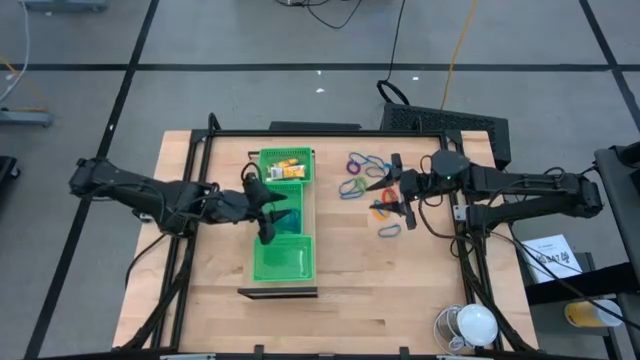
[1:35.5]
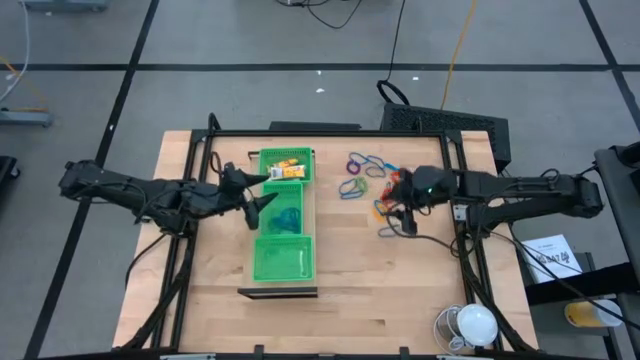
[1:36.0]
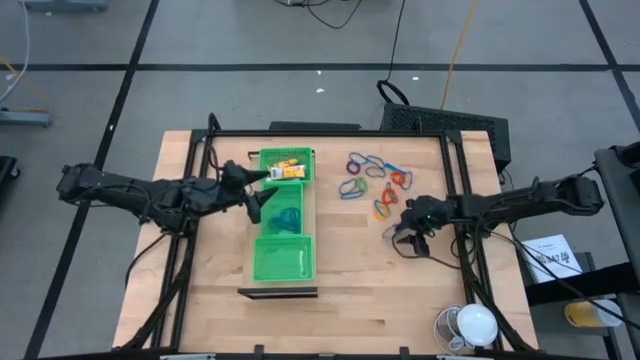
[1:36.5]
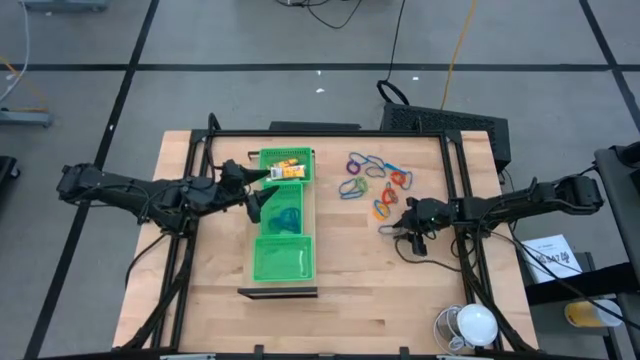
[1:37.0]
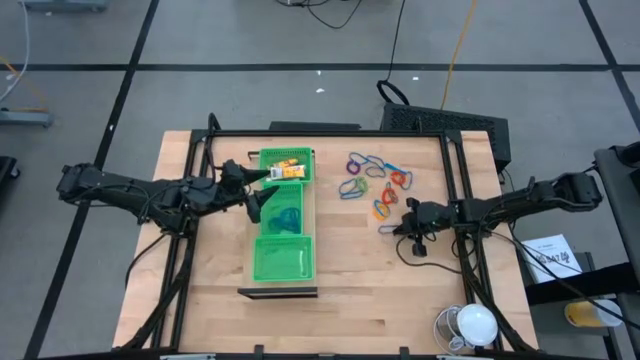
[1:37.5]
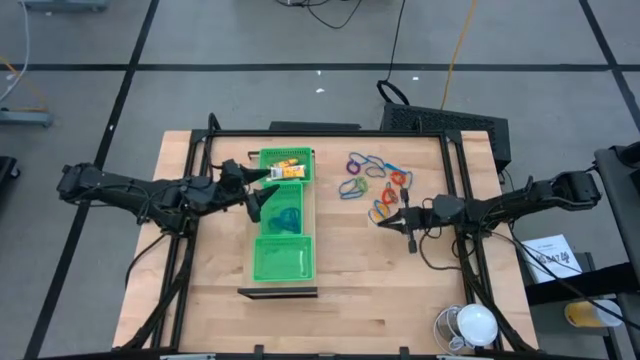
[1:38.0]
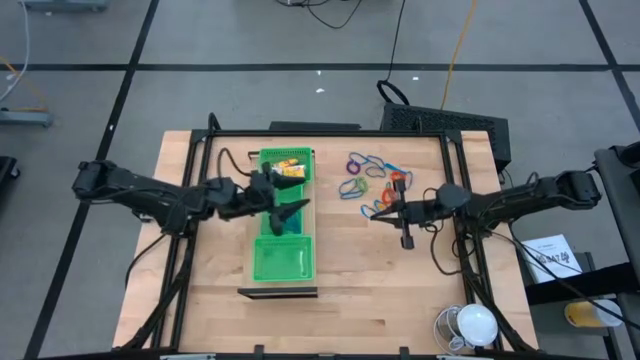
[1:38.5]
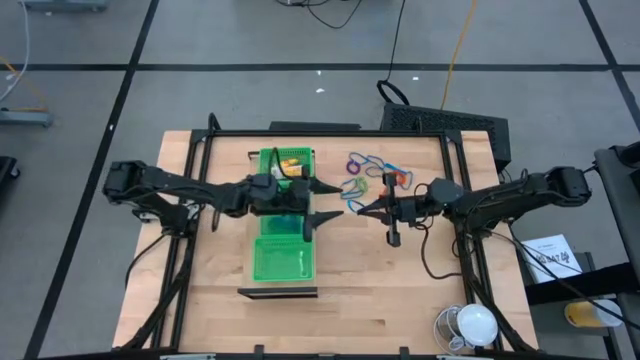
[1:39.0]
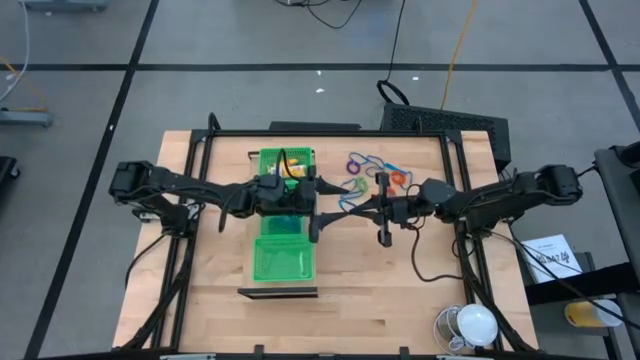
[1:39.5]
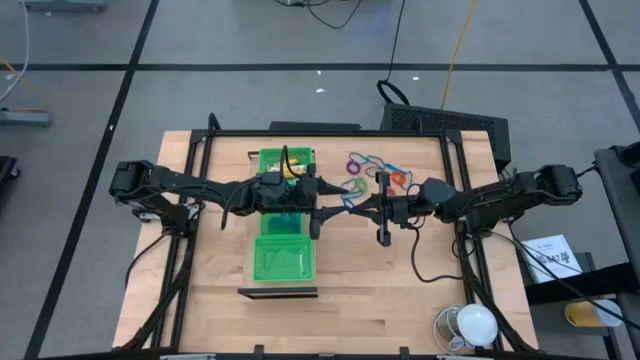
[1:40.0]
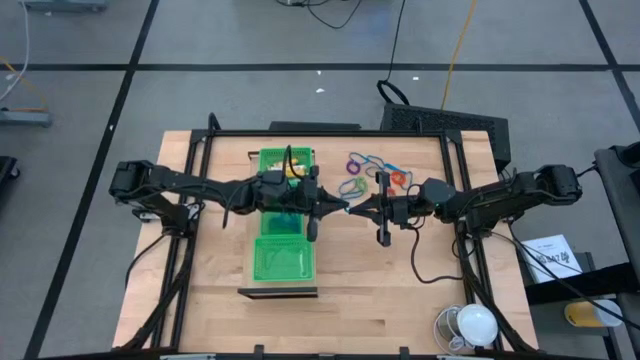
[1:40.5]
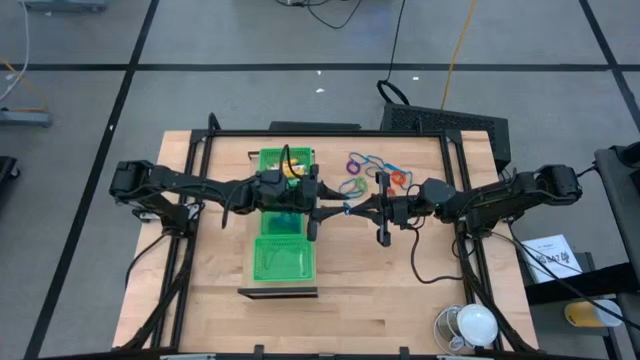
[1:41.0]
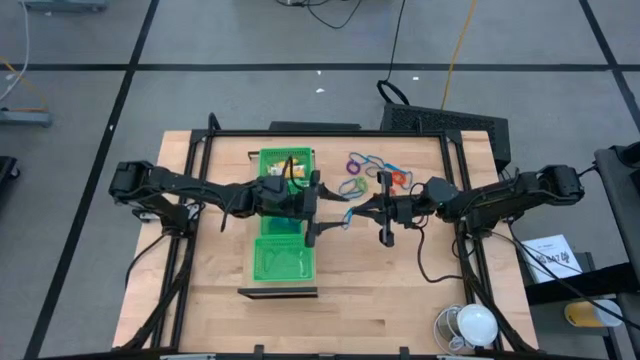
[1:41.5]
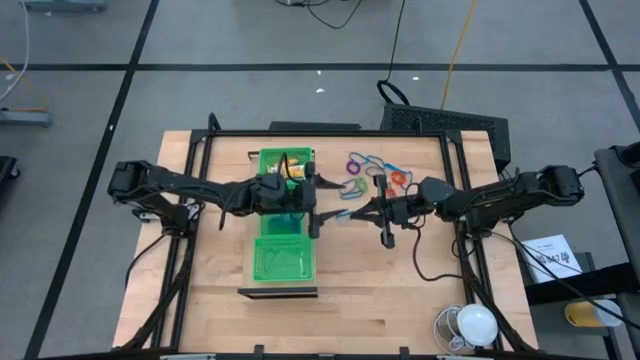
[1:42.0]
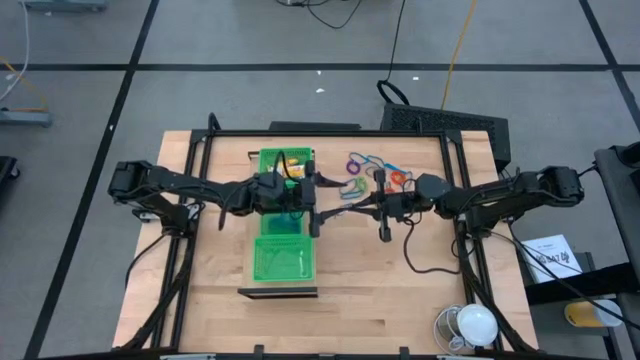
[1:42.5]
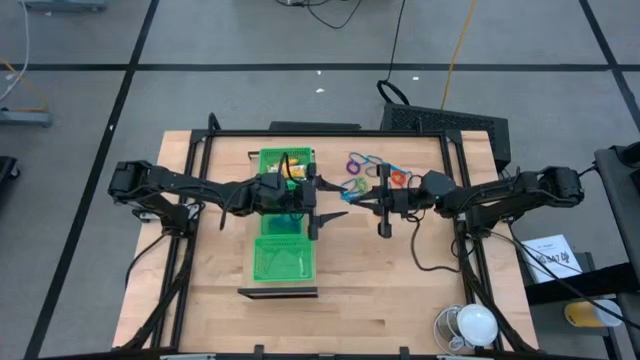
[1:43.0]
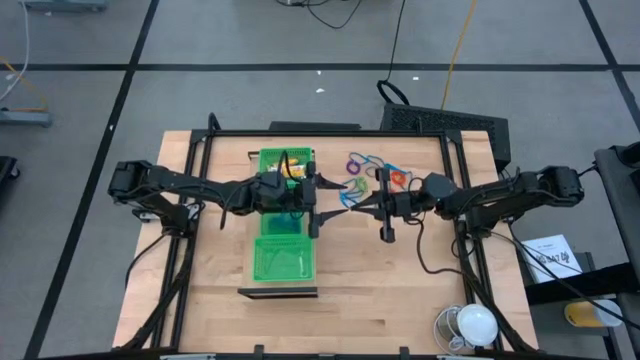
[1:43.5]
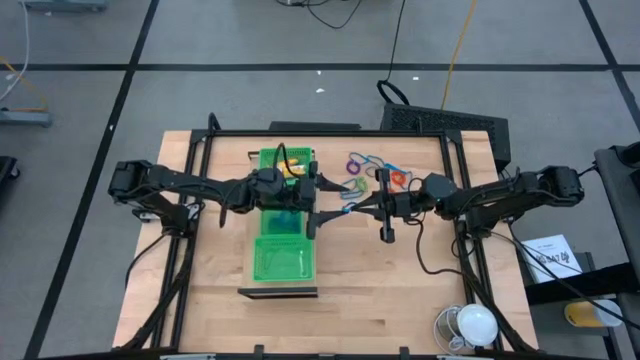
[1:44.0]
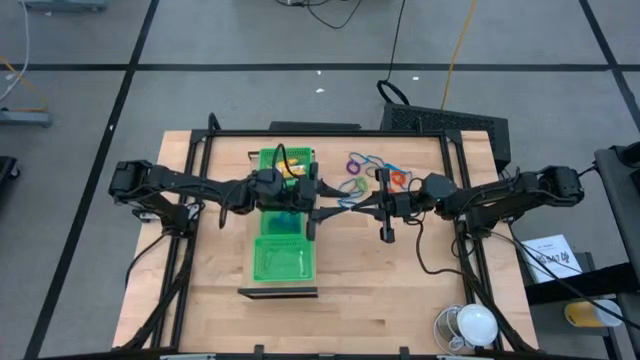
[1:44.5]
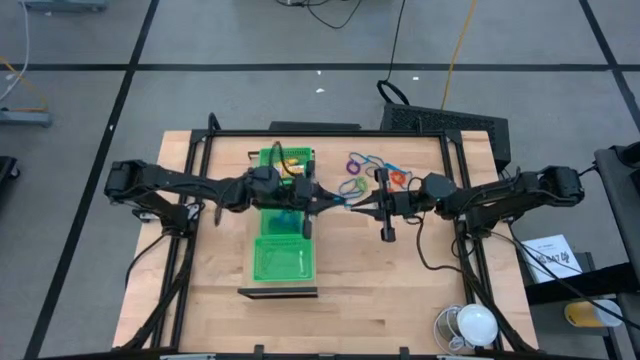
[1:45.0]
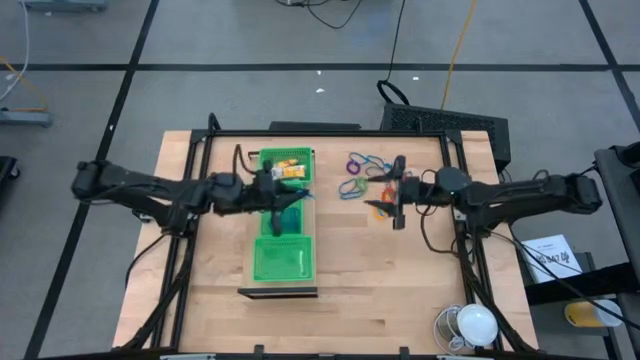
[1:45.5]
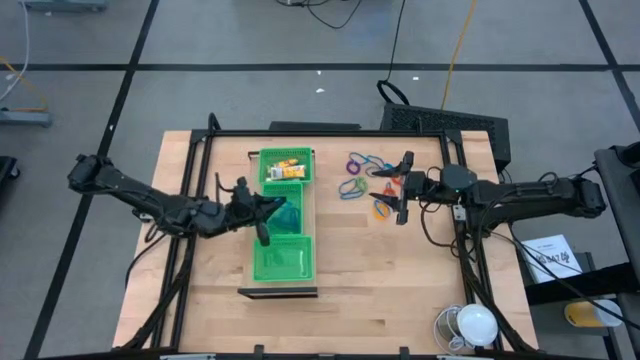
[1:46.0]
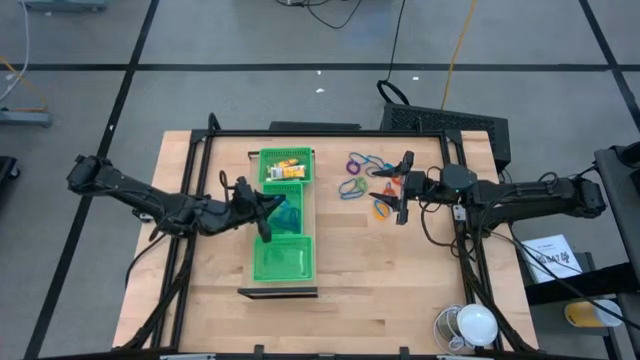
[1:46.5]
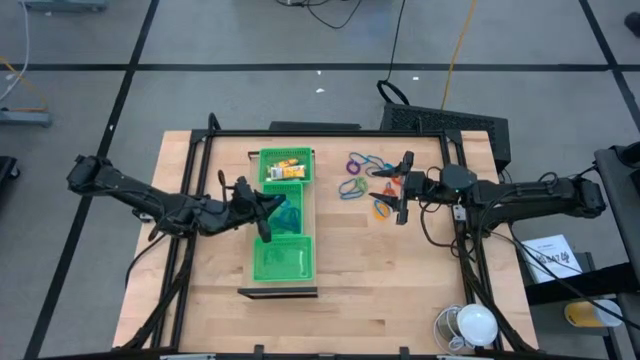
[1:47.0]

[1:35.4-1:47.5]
Task: Pick & Place Office Desk Supplies
Put the blue rubber band into the center green bin on the shelf

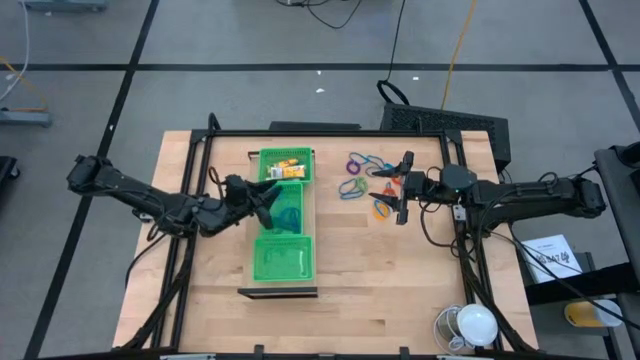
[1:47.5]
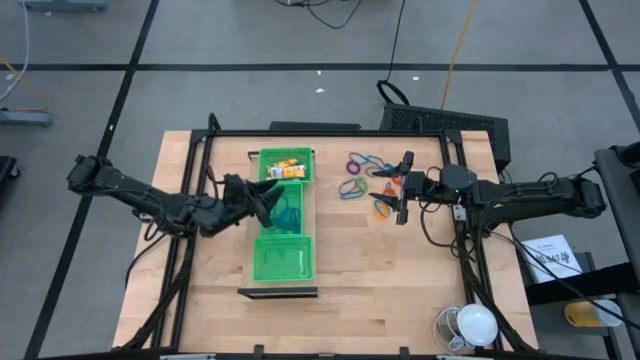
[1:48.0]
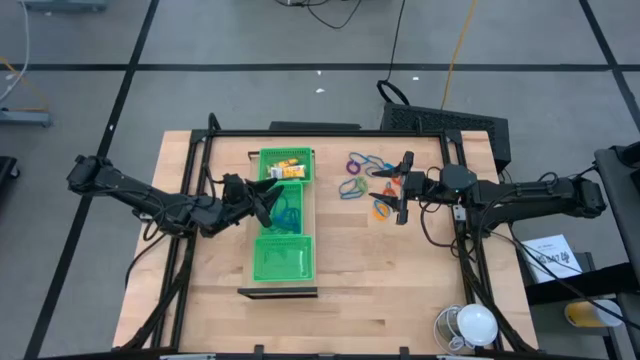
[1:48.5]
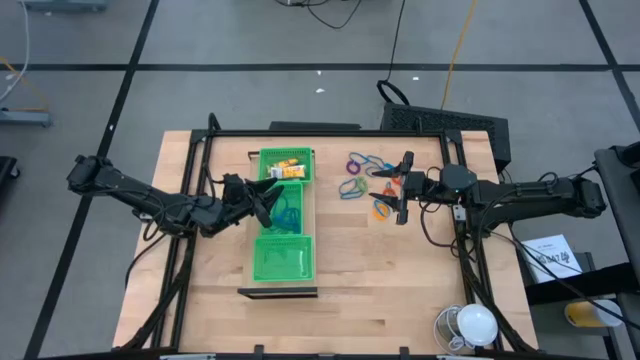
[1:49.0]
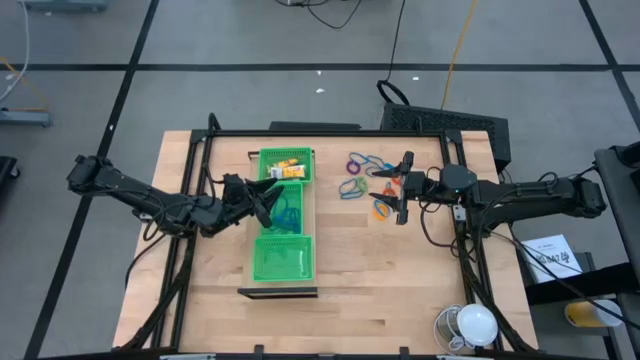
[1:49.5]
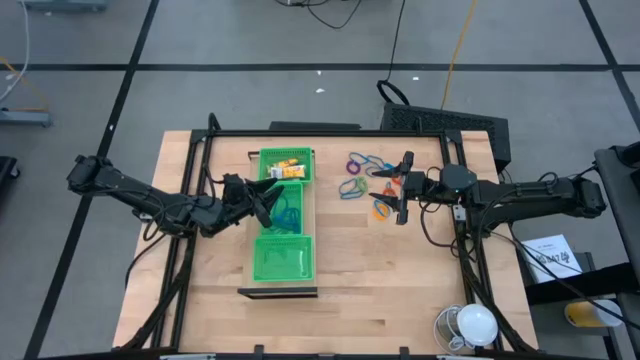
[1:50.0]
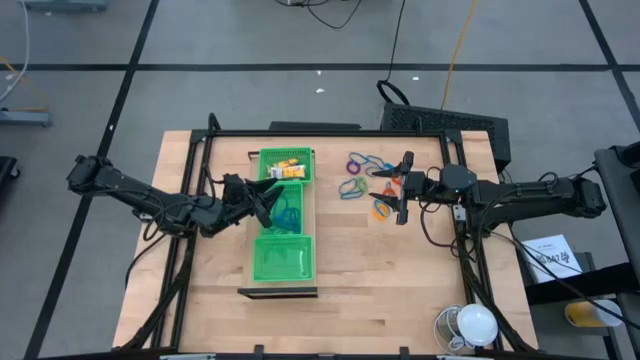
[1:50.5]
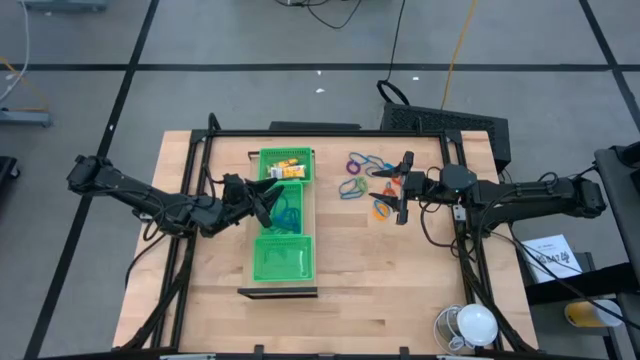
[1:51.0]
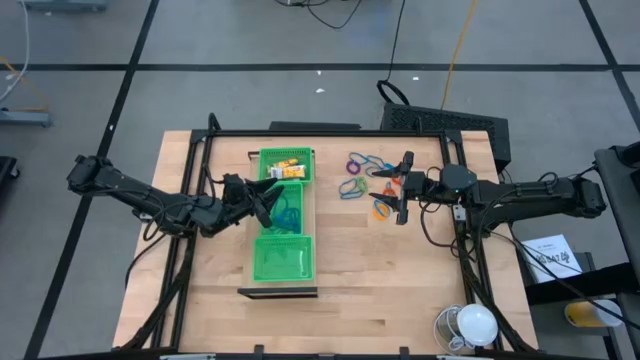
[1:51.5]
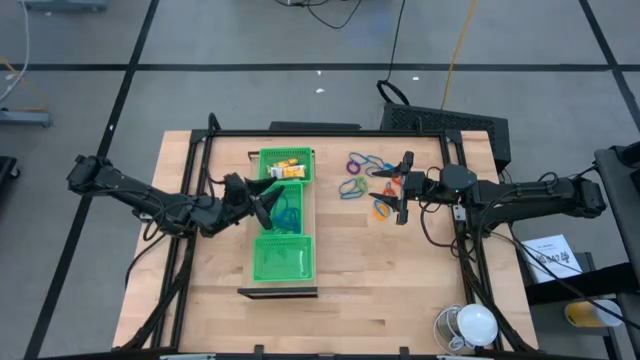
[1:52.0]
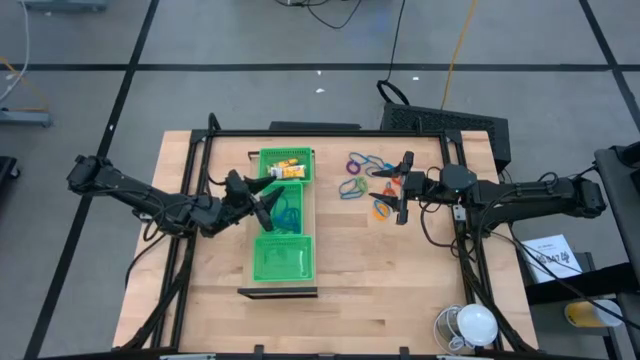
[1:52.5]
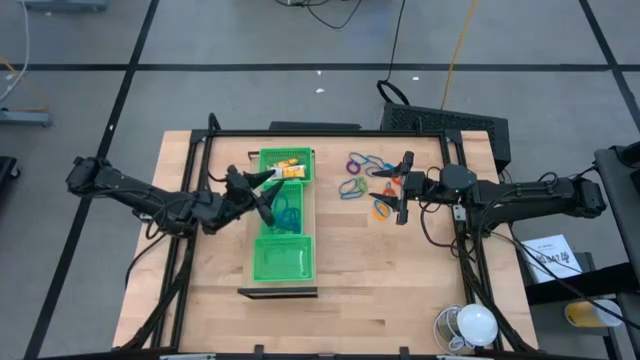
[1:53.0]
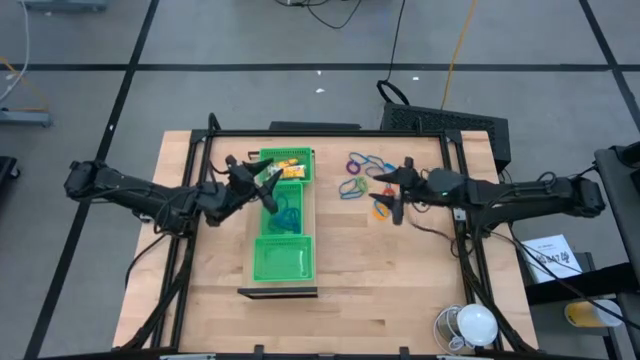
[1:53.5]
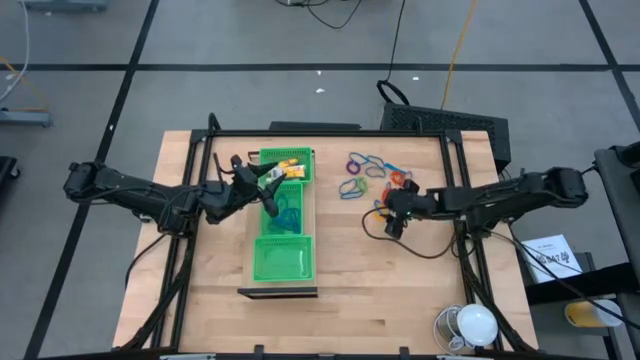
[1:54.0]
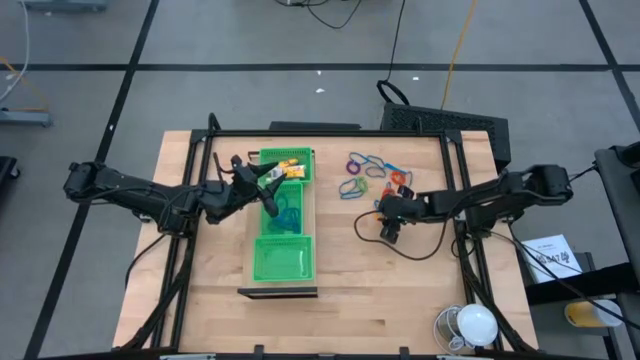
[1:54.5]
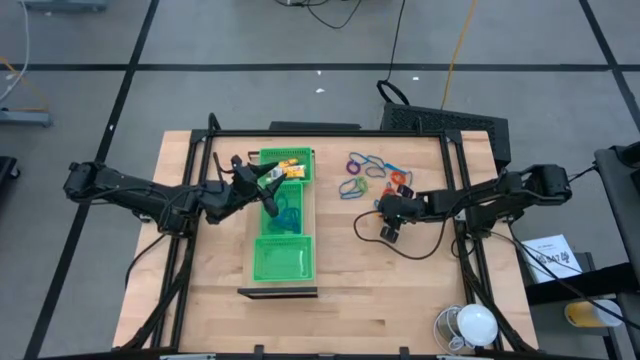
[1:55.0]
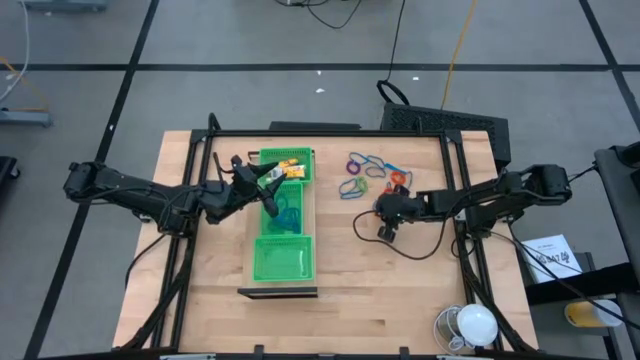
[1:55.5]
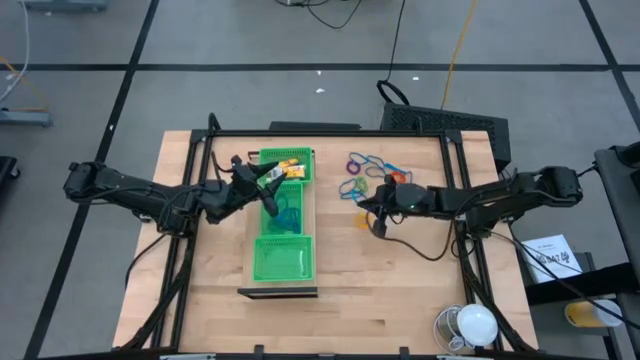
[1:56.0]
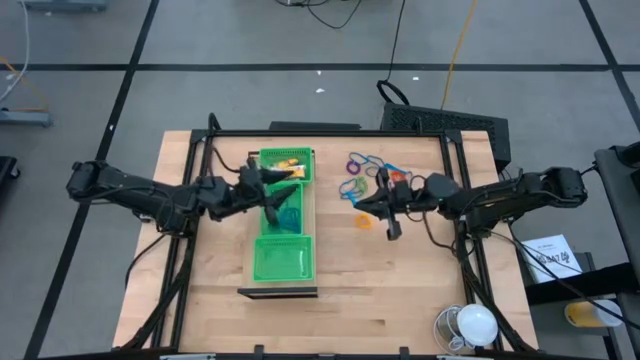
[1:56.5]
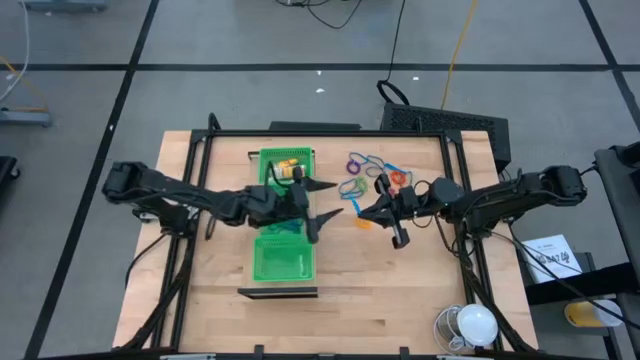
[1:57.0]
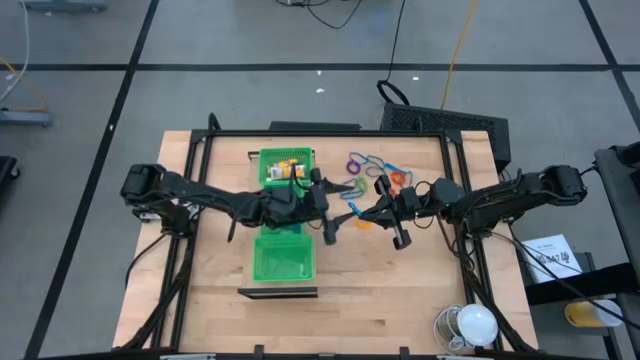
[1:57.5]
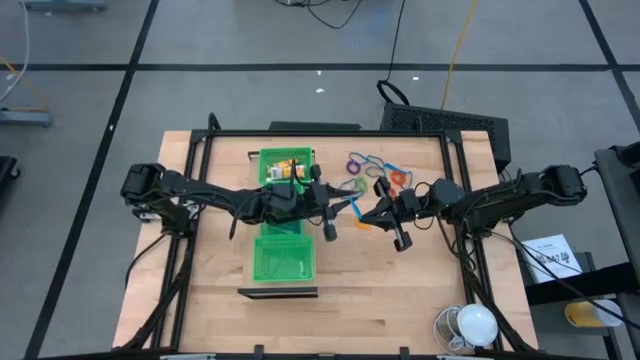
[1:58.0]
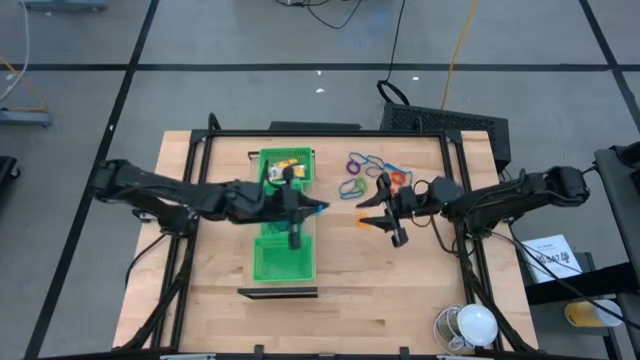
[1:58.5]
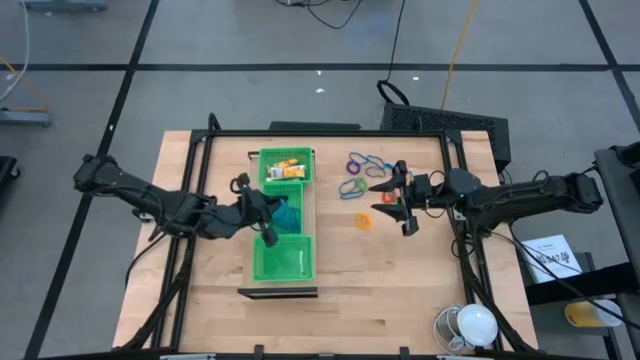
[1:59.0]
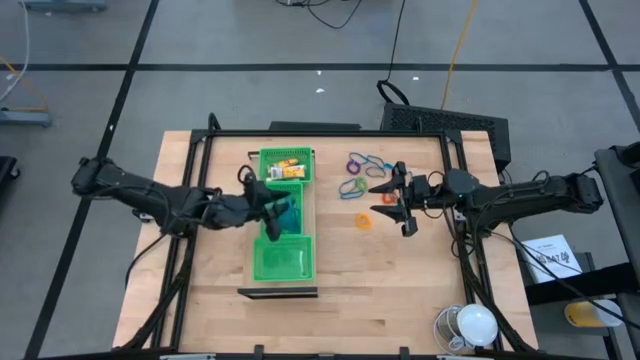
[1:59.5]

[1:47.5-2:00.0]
Put the blue rubber band into the center green bin on the shelf
